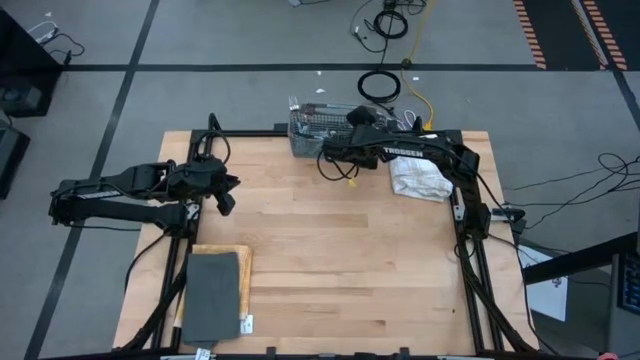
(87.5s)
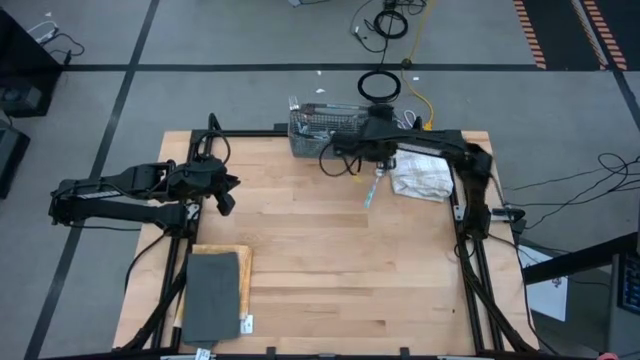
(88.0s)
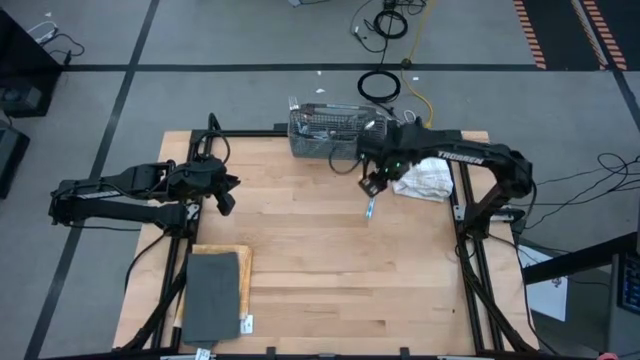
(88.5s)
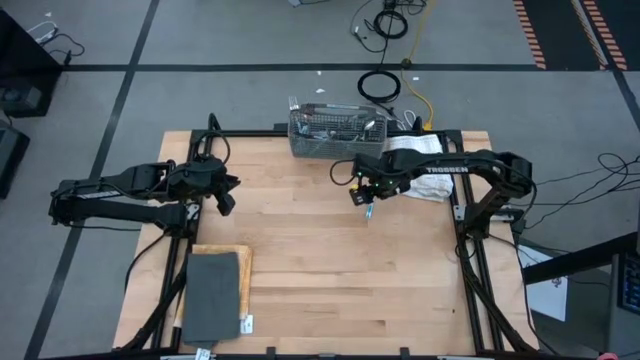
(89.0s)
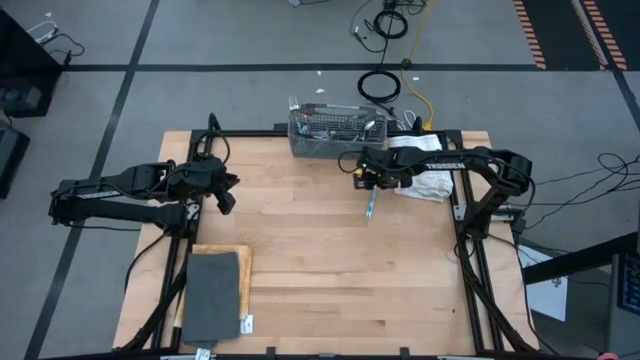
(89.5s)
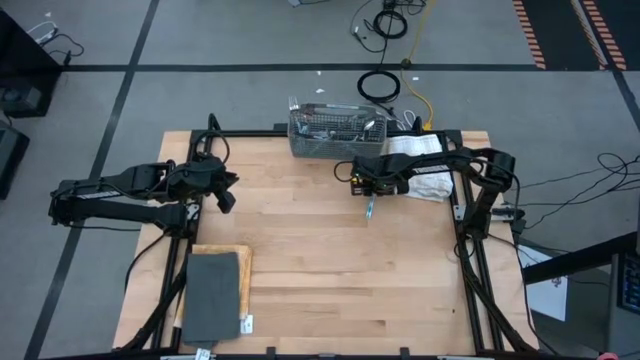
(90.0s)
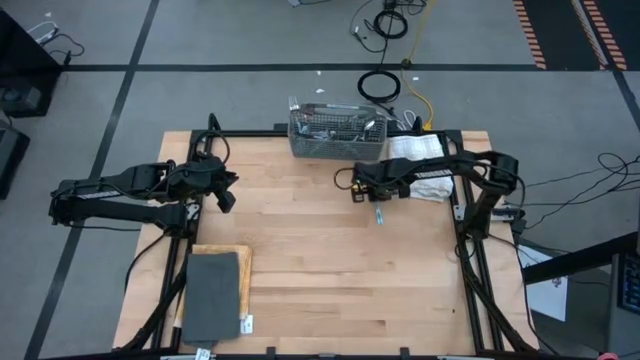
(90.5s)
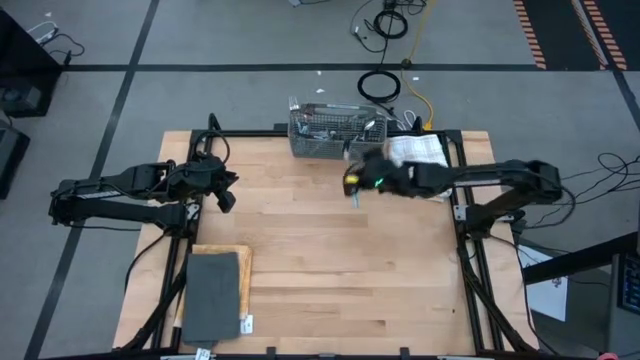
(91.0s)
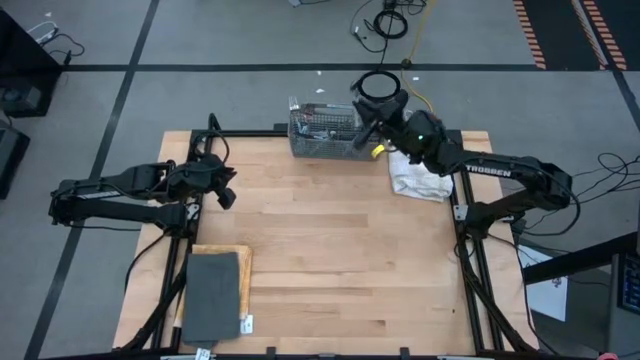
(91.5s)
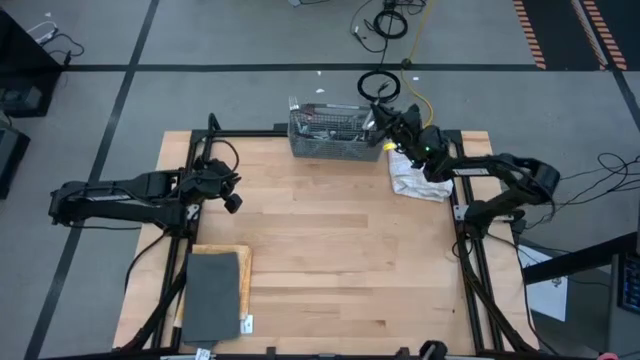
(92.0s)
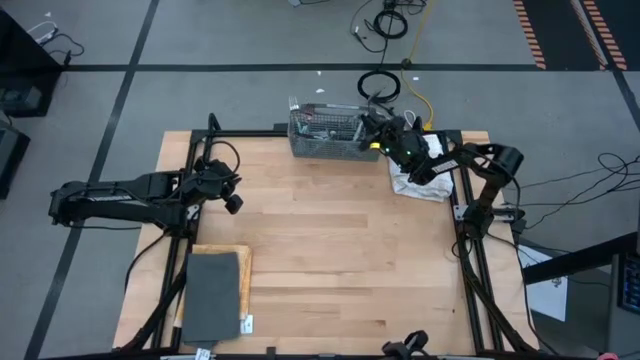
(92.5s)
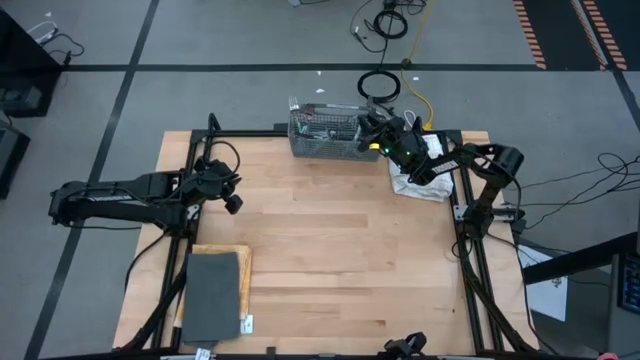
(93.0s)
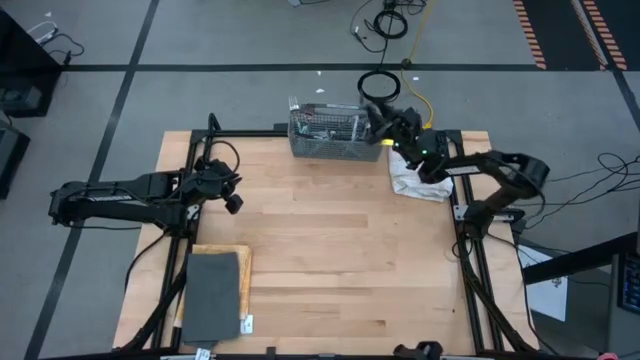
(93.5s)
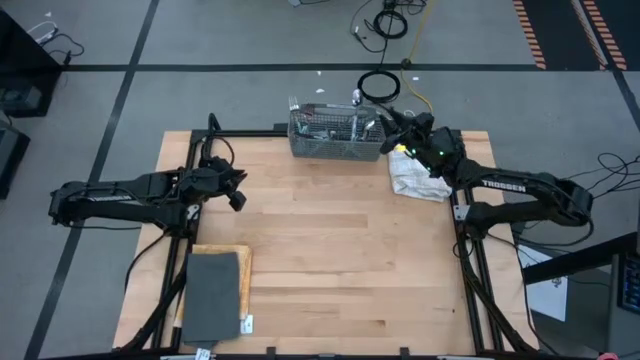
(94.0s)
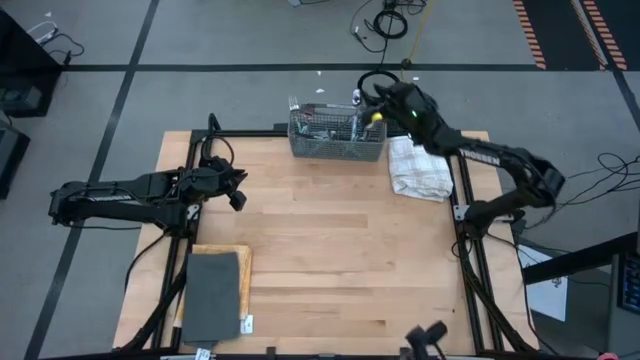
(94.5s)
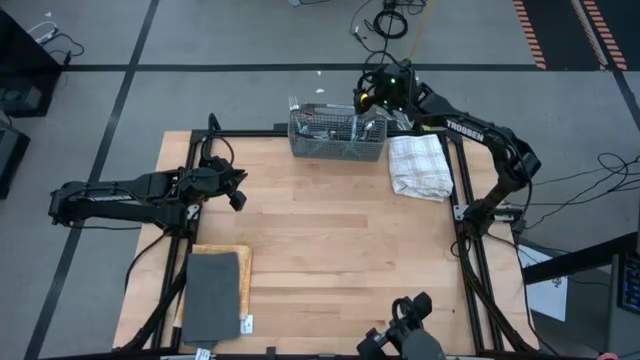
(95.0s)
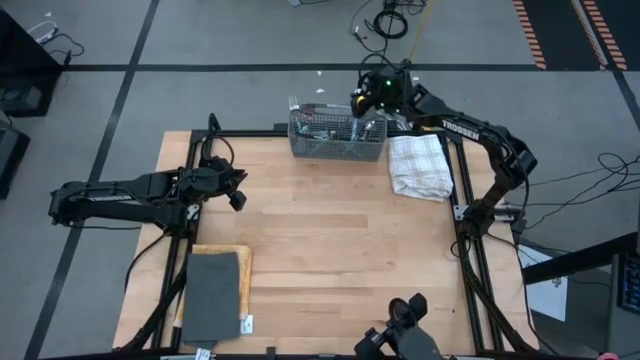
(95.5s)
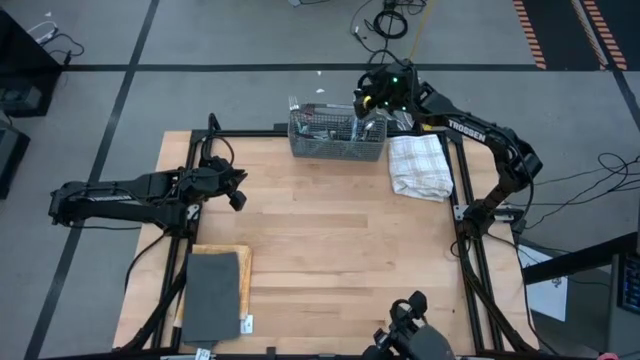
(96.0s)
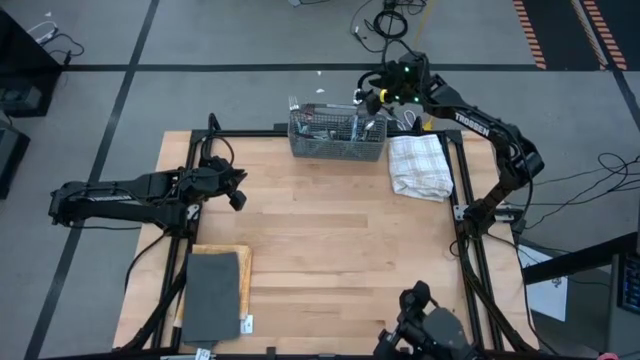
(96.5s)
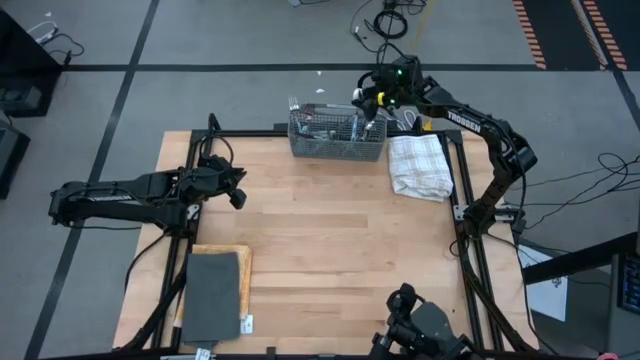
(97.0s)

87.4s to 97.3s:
Task: Sort silverware
Put the spoon into the silverware basket

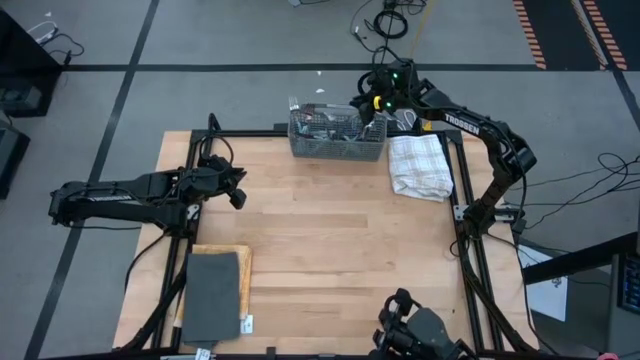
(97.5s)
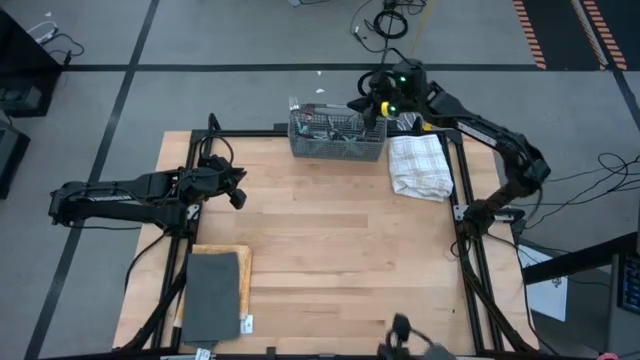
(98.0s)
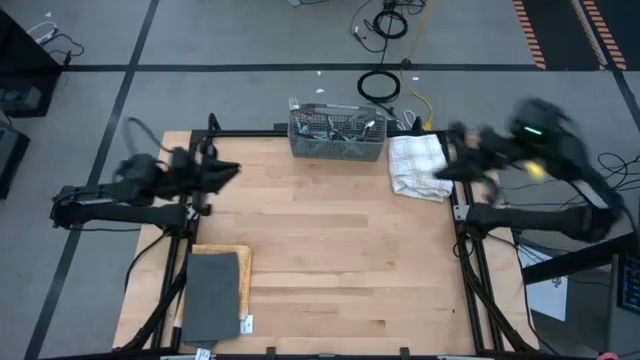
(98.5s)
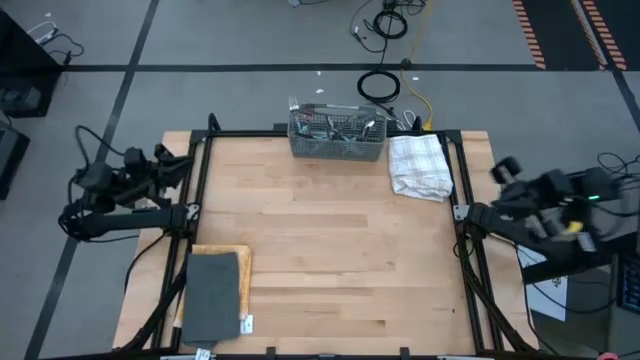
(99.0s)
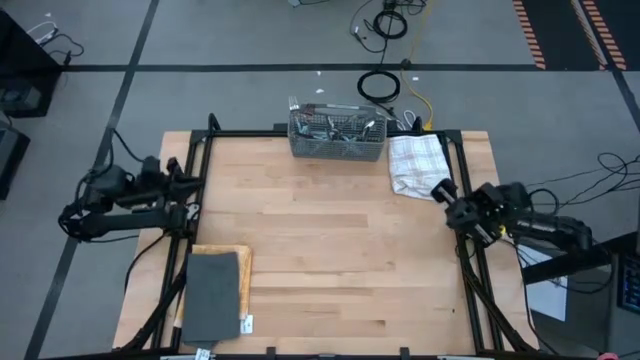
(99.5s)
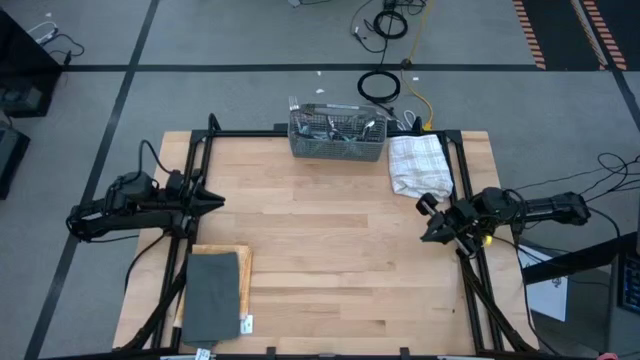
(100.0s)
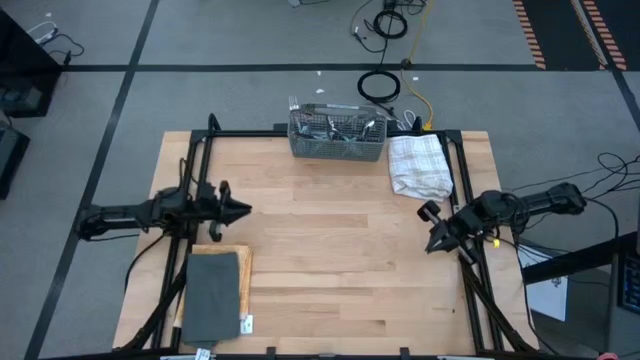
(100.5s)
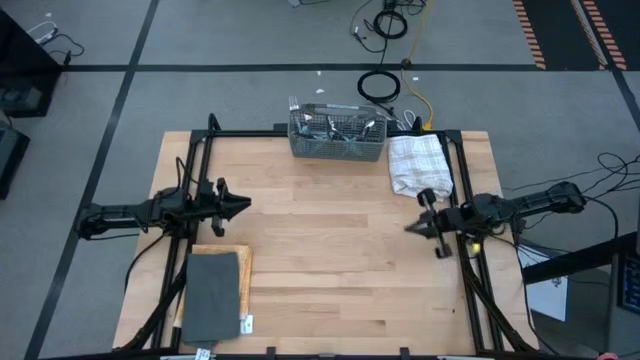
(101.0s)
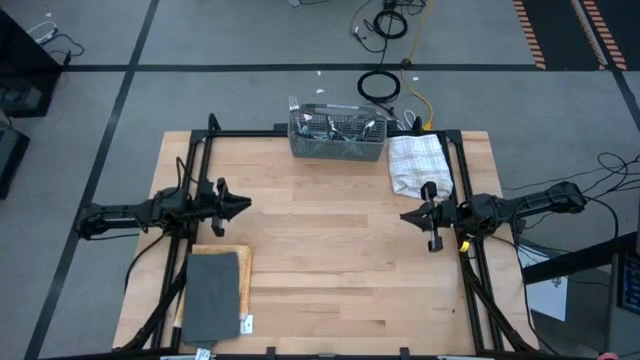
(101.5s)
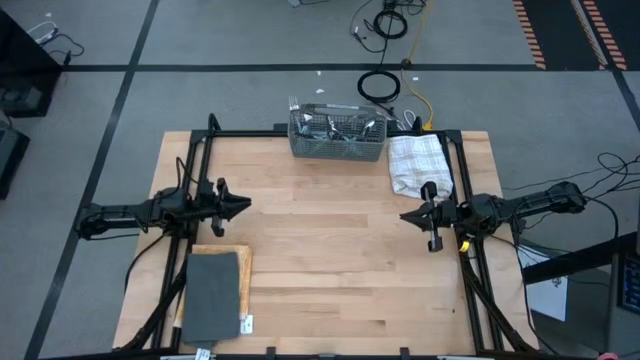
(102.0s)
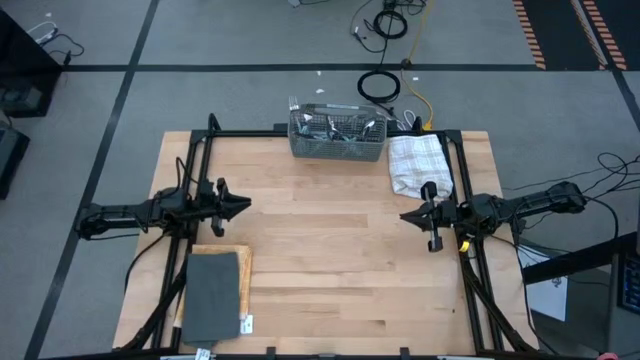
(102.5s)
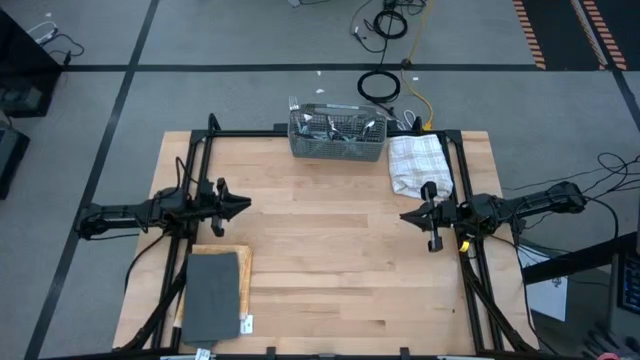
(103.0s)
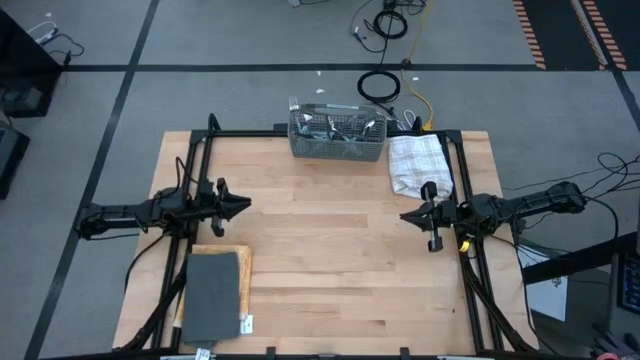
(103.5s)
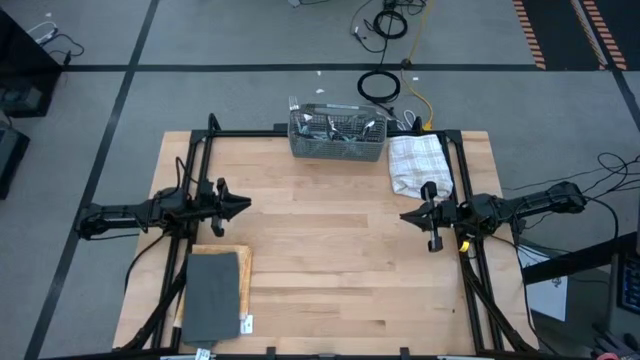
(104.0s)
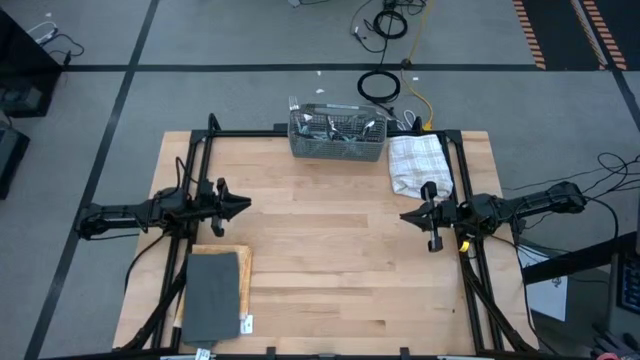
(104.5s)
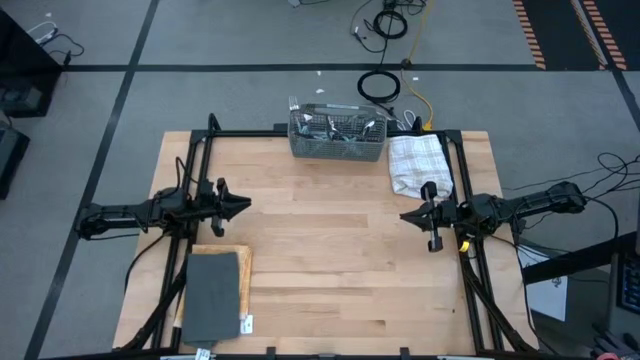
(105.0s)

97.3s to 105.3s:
Return to Home position
